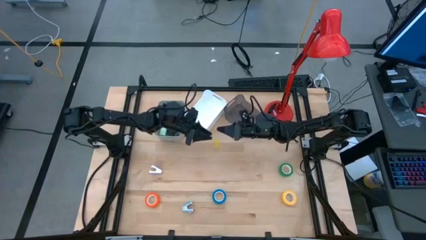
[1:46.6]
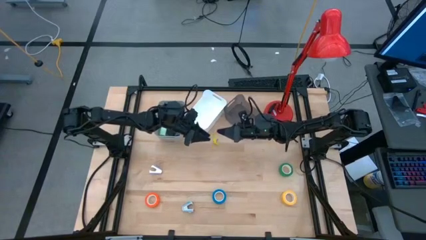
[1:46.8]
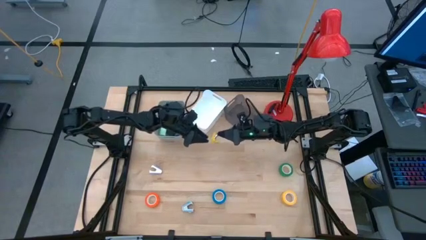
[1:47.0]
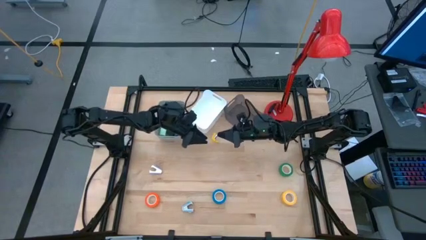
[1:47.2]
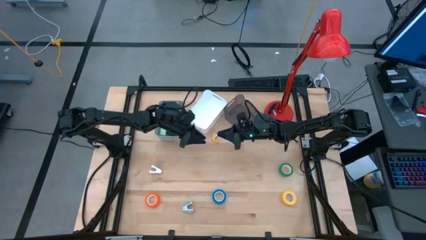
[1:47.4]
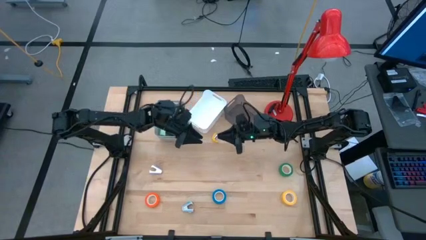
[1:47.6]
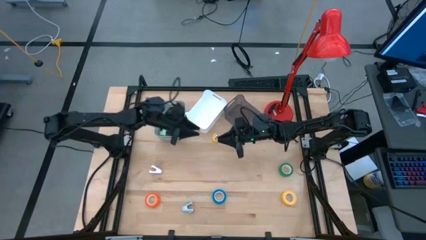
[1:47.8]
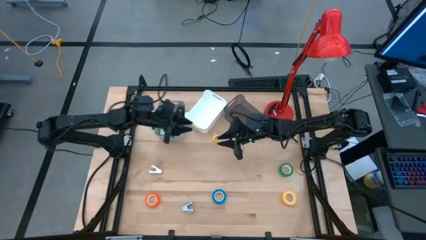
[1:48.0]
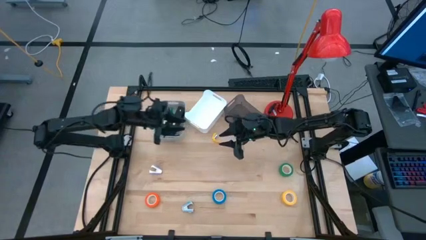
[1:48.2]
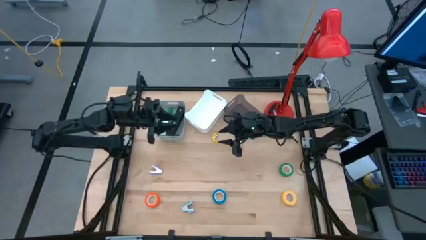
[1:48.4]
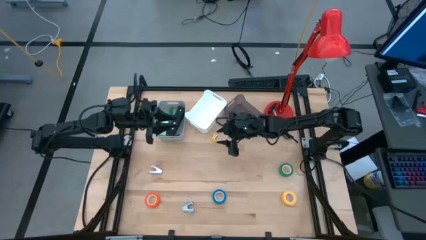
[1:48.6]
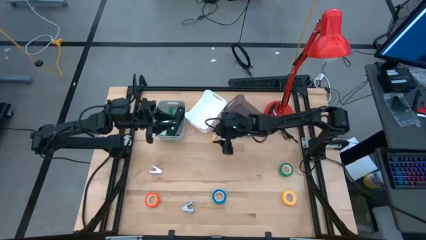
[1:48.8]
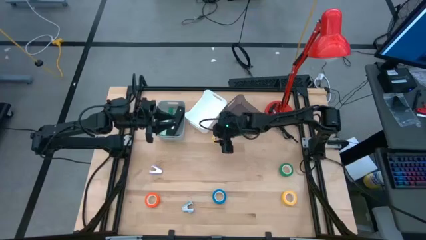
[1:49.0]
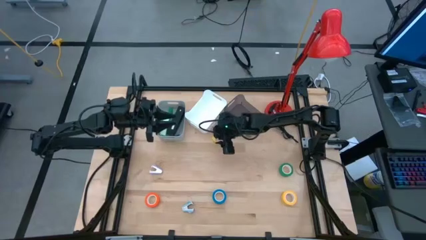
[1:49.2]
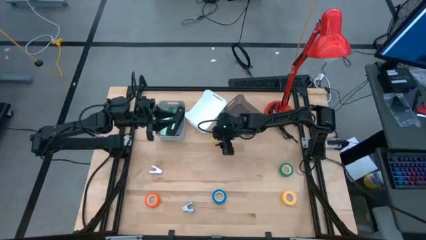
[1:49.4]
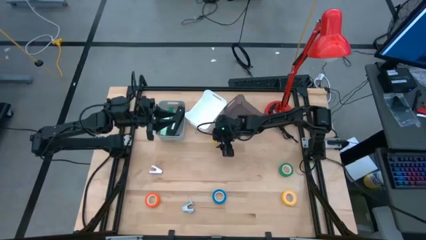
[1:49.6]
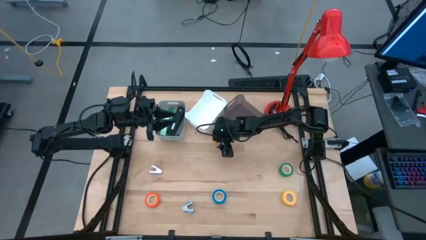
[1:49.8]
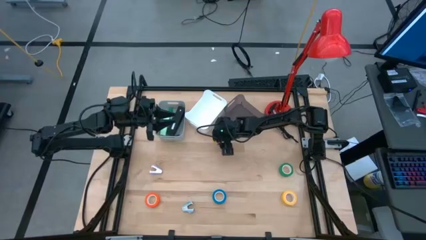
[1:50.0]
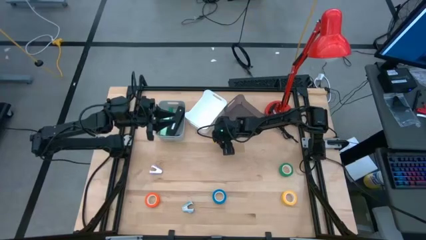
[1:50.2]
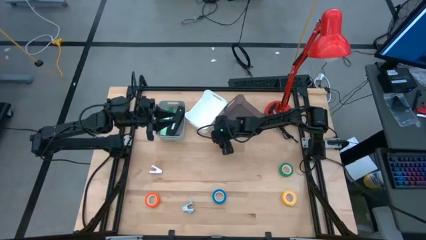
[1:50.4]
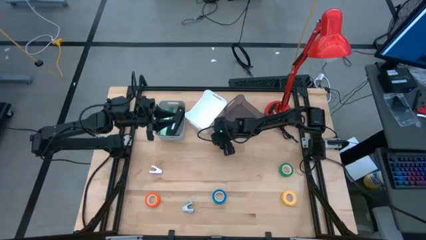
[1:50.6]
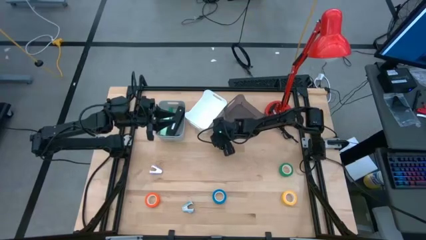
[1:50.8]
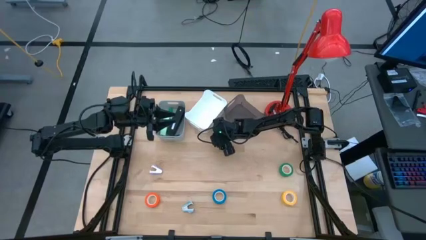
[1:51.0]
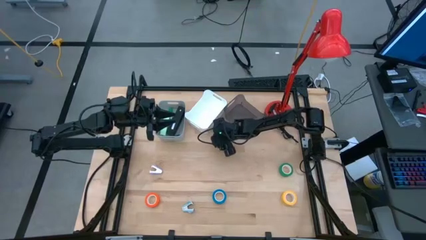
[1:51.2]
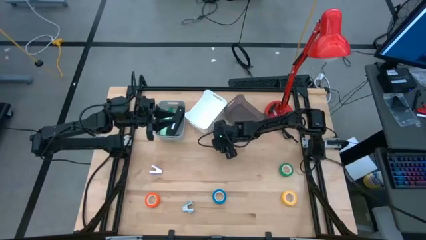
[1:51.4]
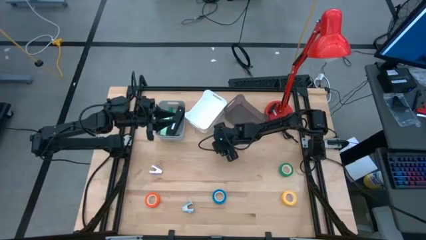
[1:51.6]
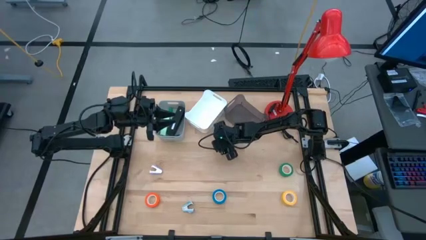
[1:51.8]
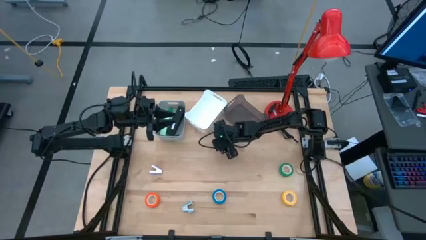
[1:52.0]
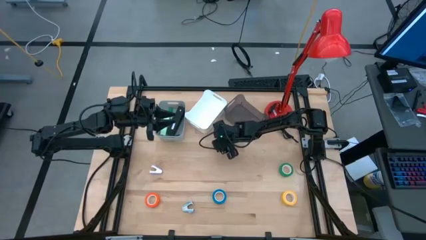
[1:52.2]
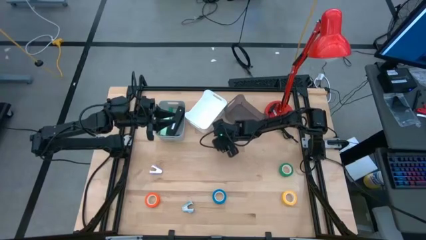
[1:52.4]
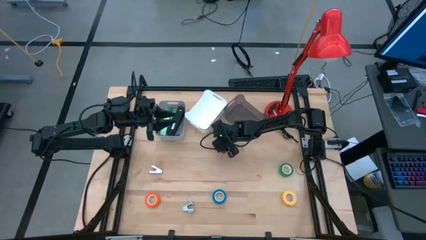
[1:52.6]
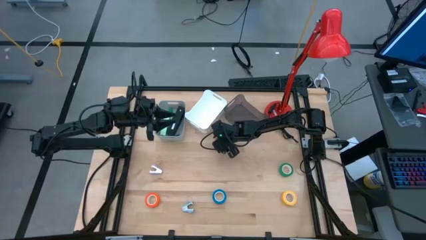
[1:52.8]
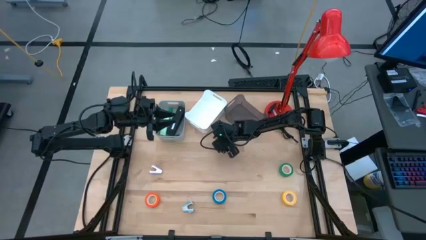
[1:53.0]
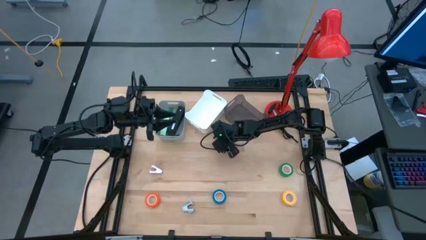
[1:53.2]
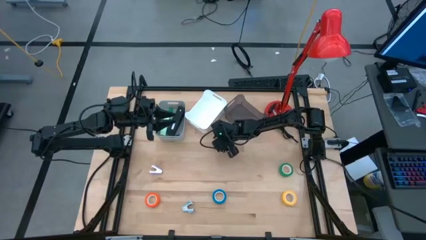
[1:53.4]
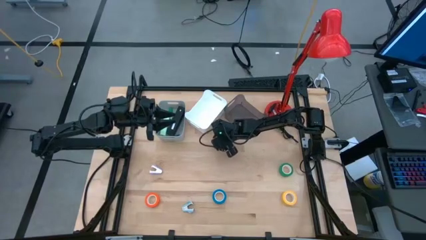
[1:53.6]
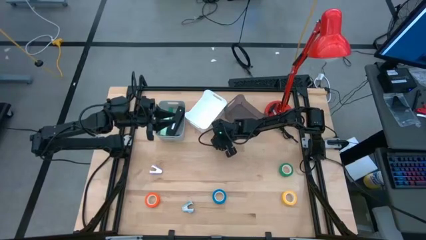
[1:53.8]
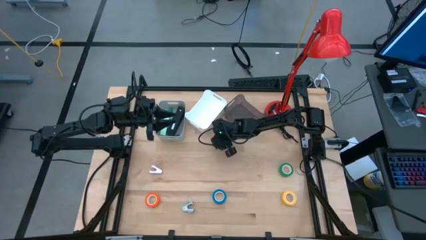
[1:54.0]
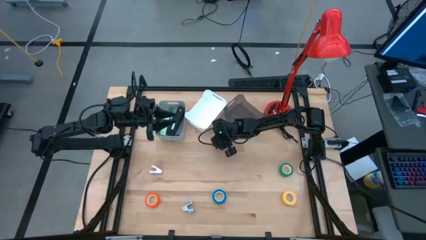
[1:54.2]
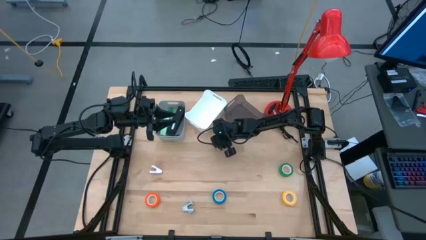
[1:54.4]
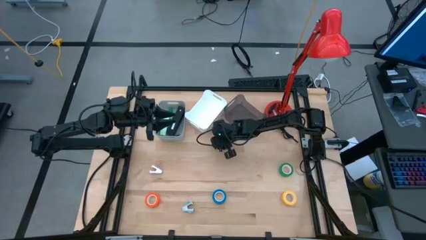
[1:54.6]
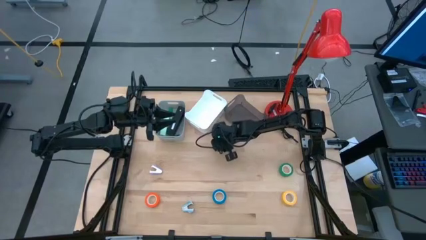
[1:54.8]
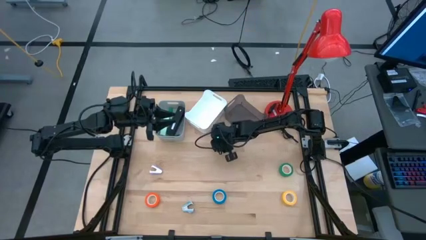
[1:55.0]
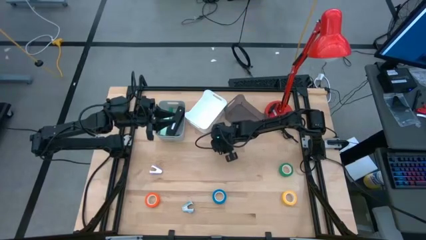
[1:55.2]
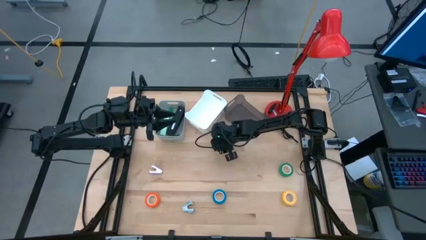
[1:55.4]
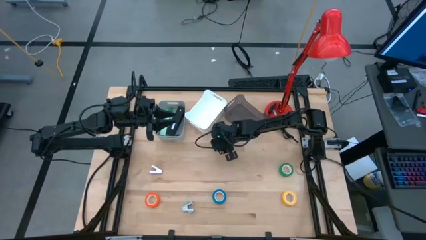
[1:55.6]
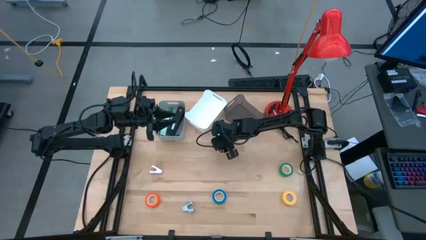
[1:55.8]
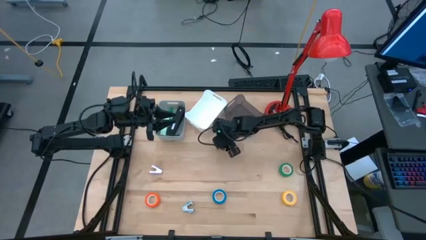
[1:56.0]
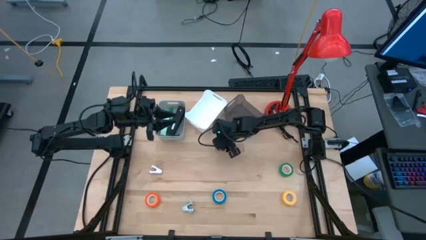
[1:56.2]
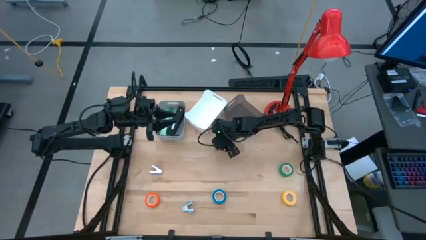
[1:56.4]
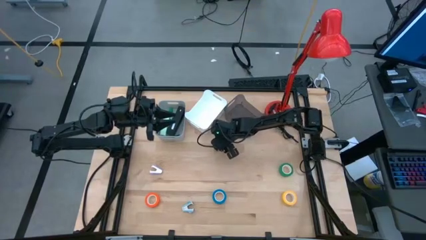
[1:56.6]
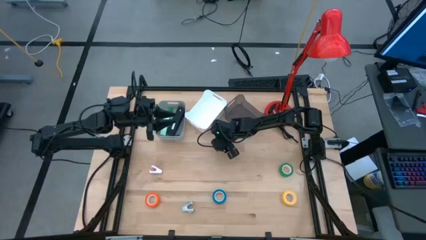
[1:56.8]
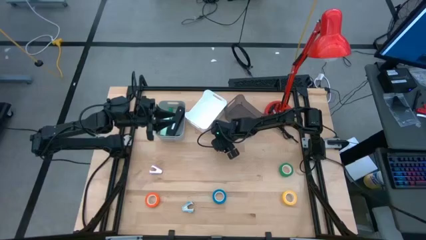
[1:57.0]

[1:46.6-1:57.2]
Task: Pick and place Stapler, Stapler remover, tape
Put the small yellow stapler into the gray bin

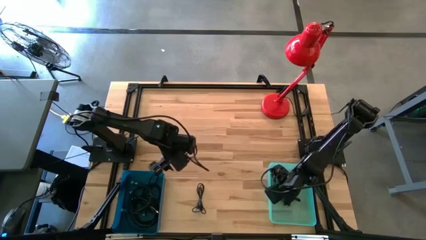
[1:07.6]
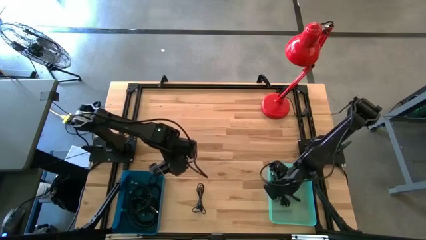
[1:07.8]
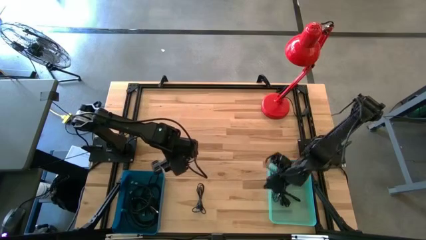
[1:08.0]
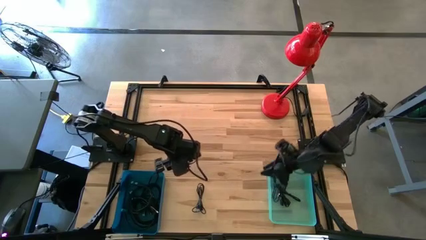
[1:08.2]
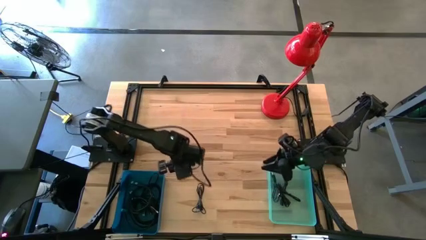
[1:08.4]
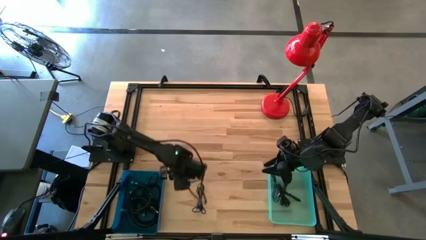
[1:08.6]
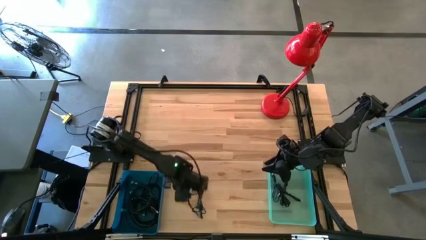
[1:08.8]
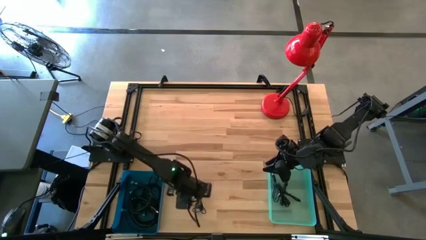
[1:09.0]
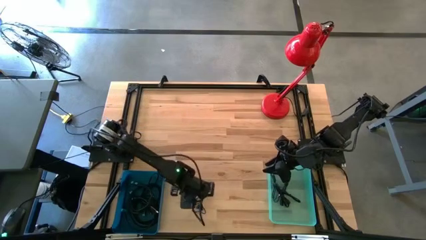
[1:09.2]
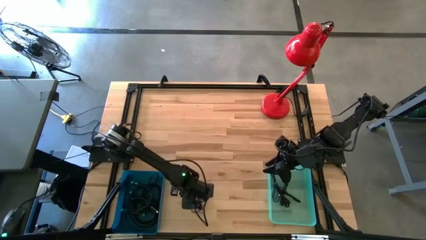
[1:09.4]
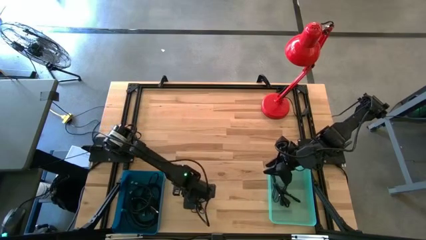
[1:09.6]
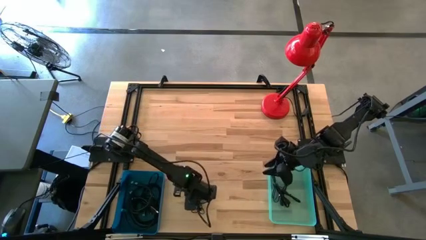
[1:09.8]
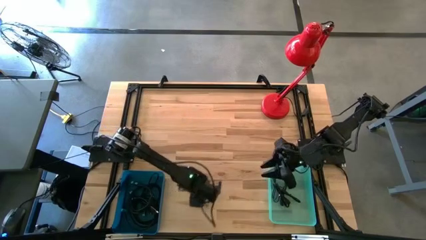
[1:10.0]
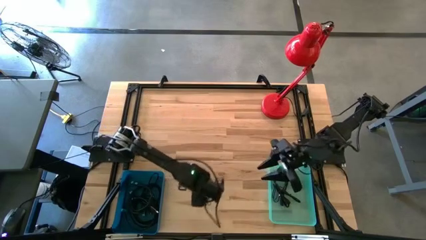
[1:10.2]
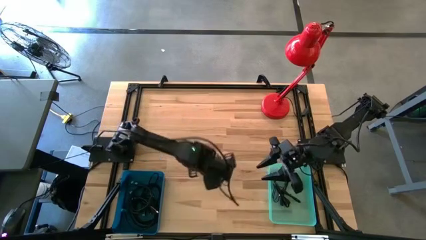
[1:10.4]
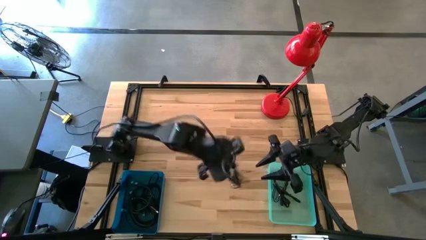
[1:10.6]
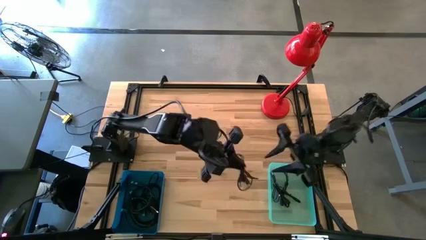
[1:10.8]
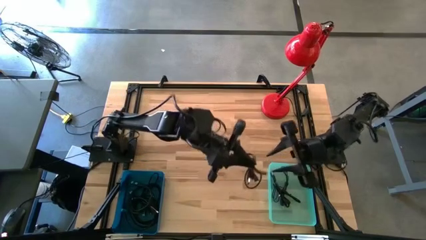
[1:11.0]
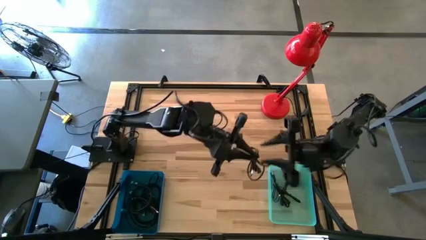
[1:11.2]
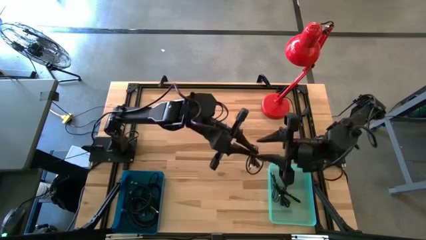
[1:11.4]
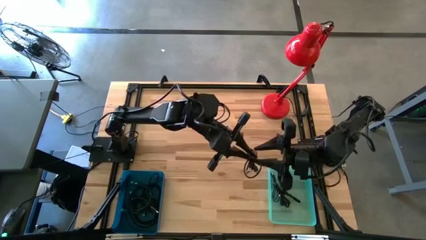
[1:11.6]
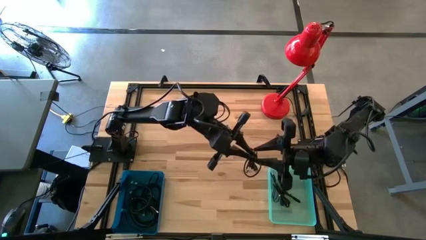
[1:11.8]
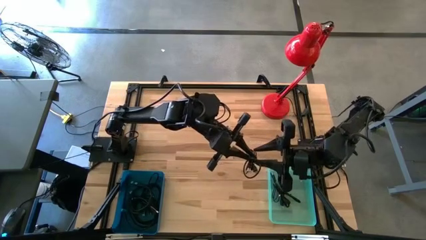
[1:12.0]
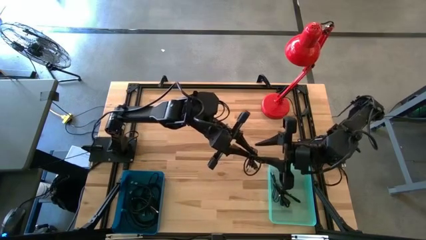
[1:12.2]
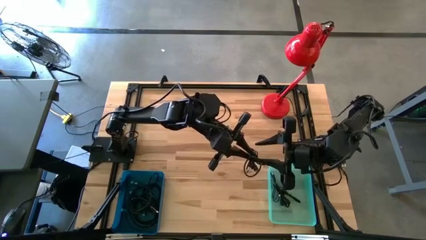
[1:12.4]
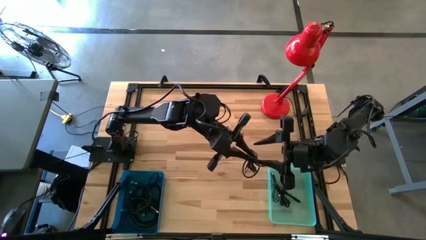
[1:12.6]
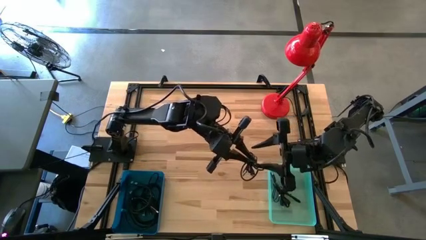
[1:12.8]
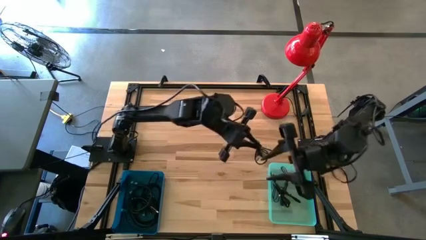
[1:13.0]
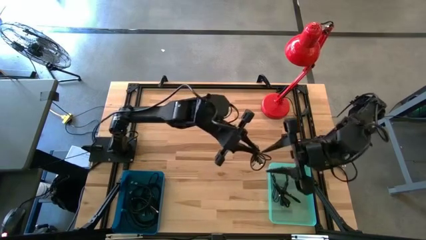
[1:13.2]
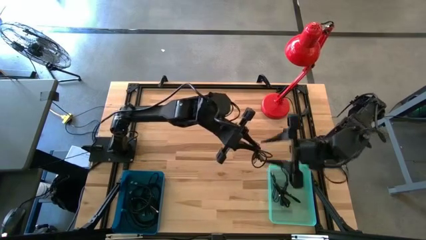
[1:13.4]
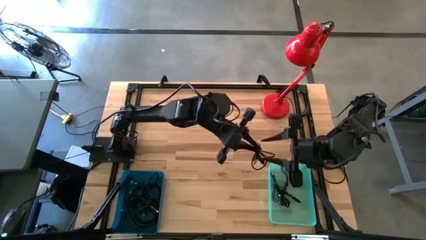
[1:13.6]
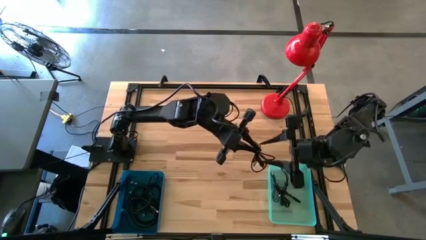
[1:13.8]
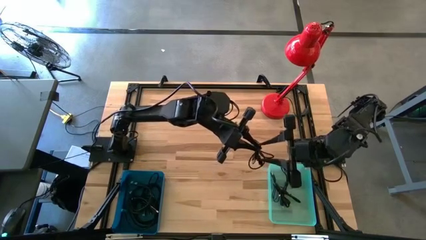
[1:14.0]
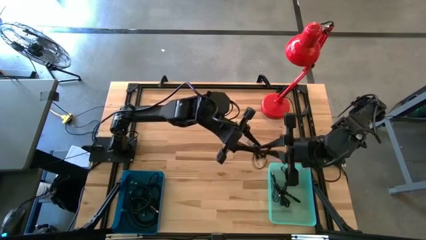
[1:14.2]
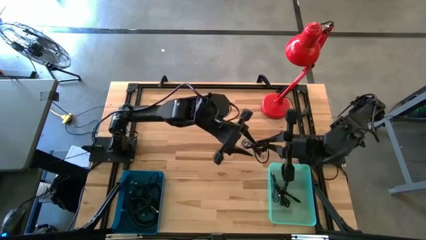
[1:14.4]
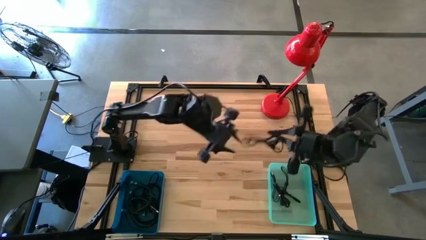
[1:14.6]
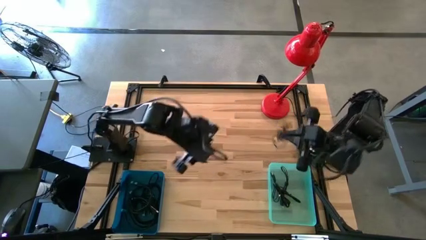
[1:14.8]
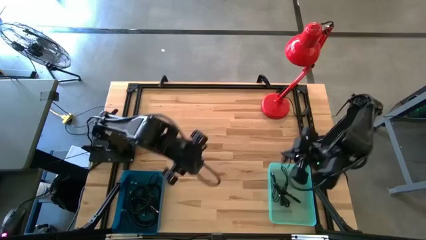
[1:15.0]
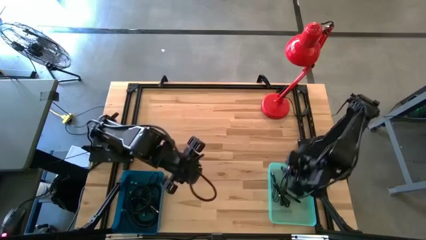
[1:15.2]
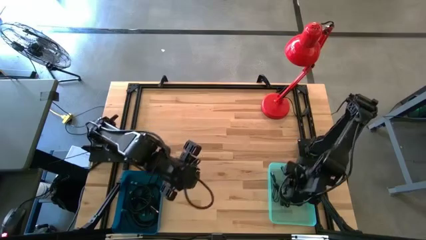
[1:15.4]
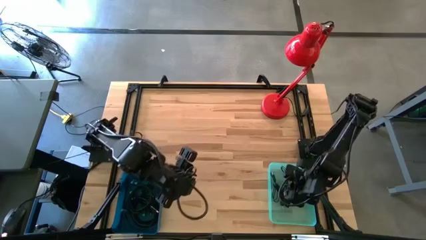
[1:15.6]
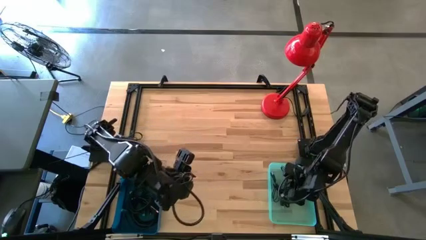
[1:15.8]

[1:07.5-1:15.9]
Task: Pick & Place USB Port
Put the black charger cable into the light blue bin
